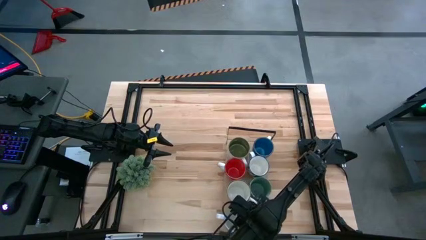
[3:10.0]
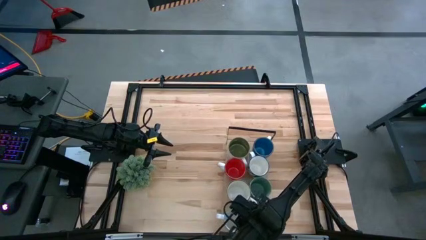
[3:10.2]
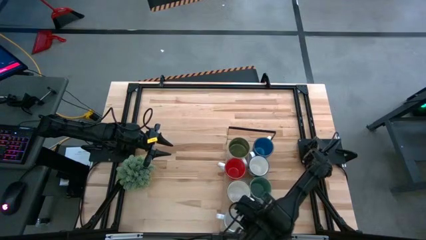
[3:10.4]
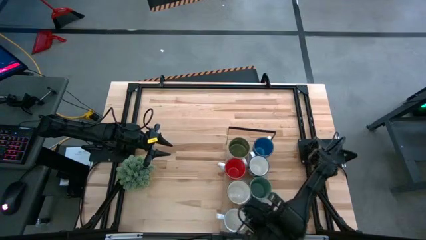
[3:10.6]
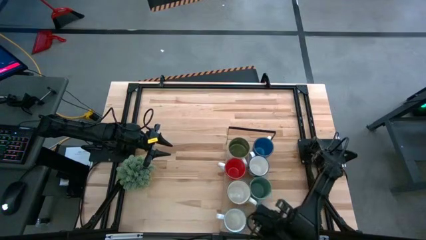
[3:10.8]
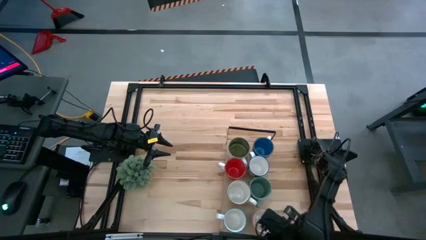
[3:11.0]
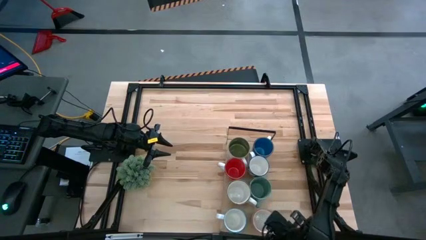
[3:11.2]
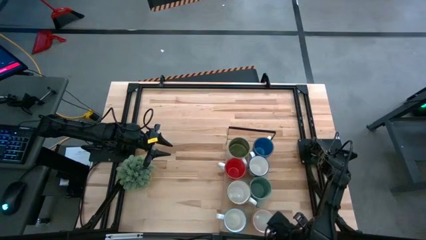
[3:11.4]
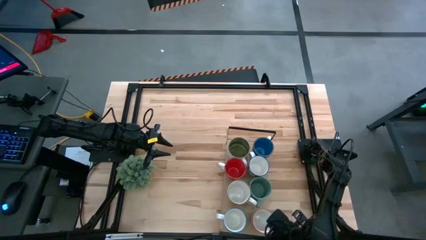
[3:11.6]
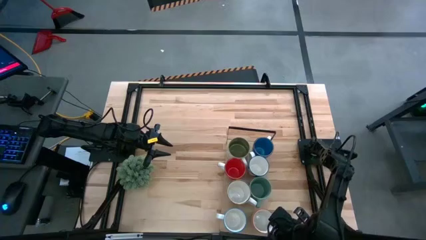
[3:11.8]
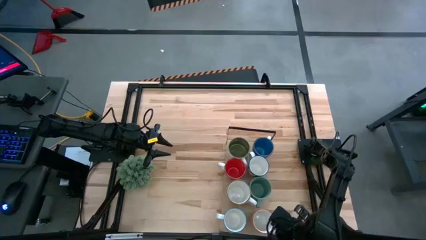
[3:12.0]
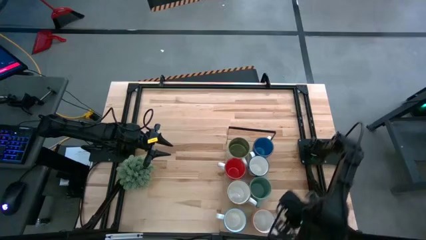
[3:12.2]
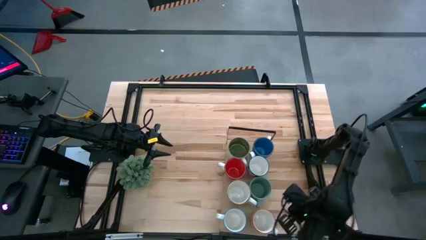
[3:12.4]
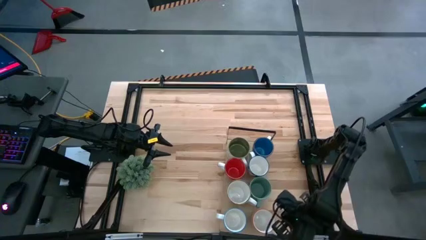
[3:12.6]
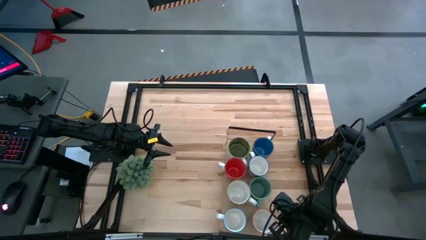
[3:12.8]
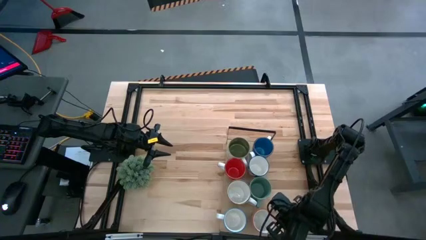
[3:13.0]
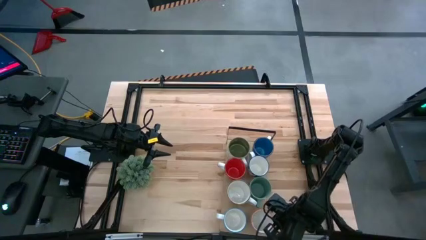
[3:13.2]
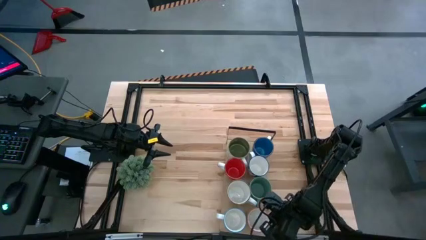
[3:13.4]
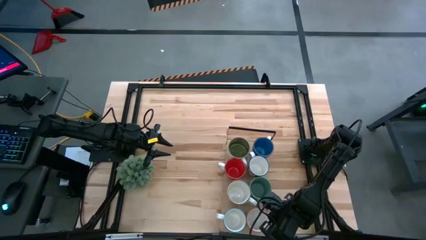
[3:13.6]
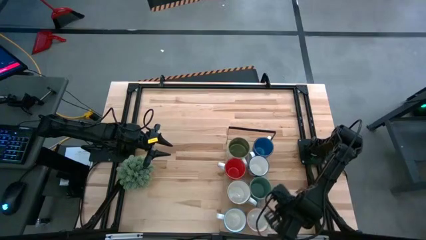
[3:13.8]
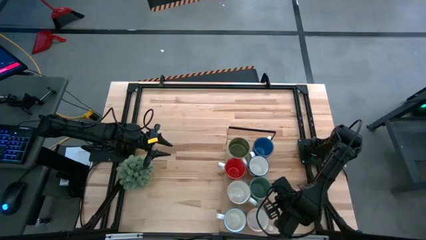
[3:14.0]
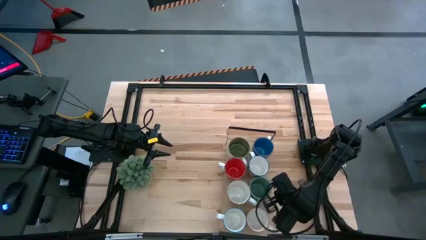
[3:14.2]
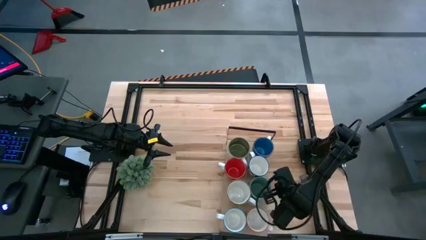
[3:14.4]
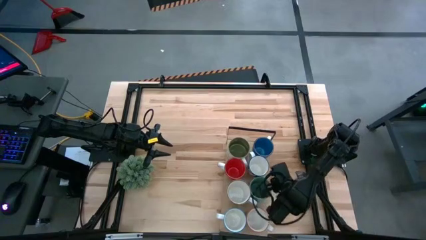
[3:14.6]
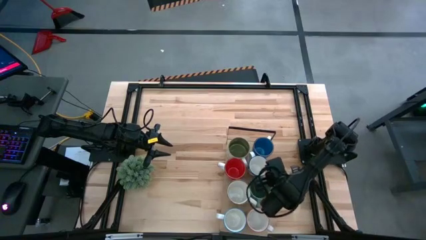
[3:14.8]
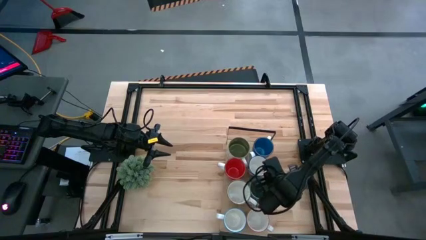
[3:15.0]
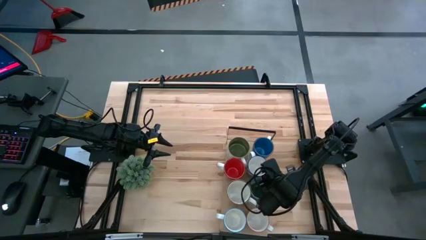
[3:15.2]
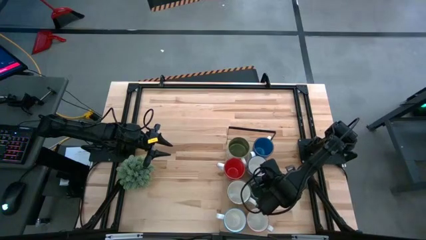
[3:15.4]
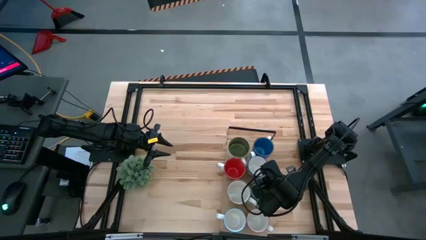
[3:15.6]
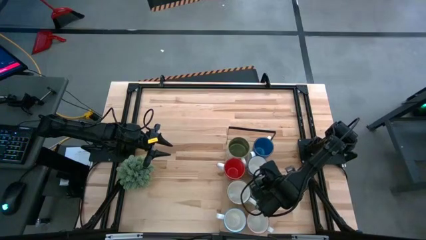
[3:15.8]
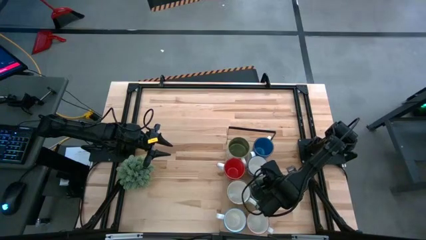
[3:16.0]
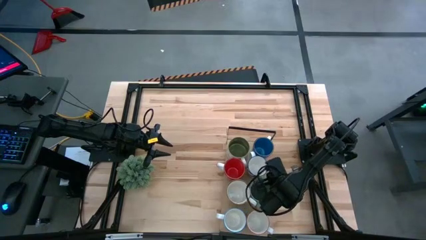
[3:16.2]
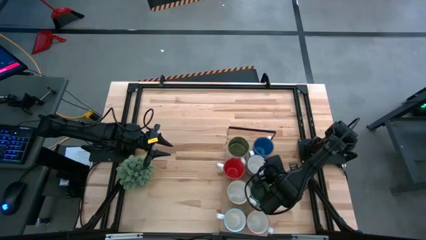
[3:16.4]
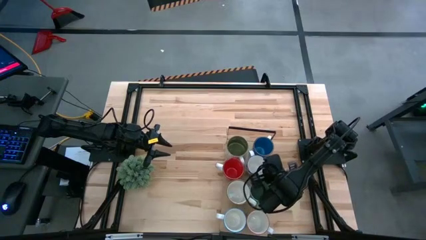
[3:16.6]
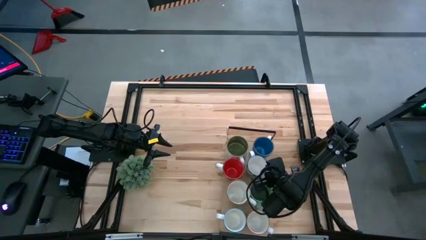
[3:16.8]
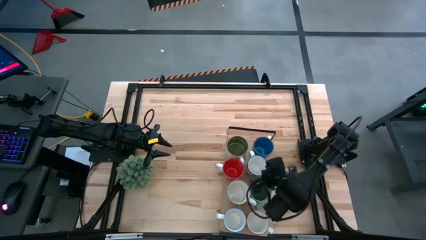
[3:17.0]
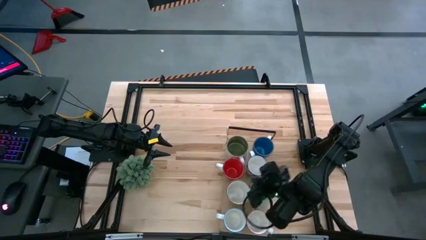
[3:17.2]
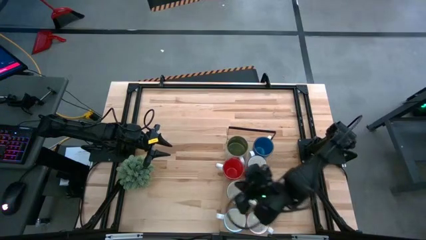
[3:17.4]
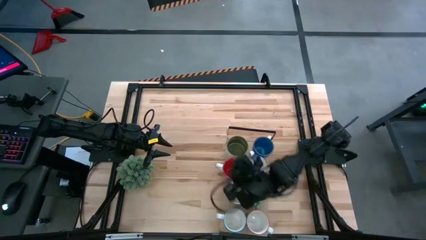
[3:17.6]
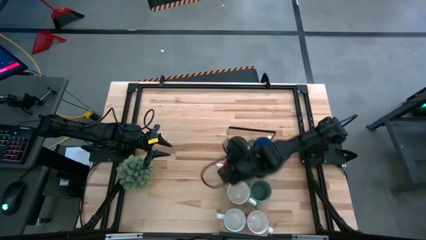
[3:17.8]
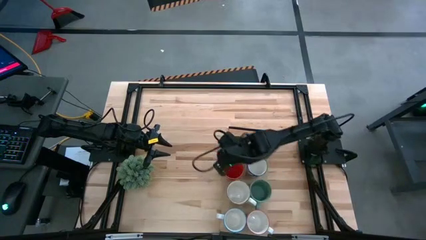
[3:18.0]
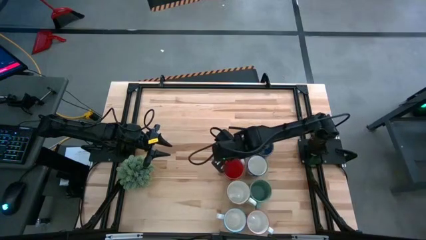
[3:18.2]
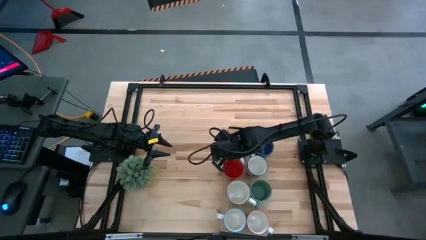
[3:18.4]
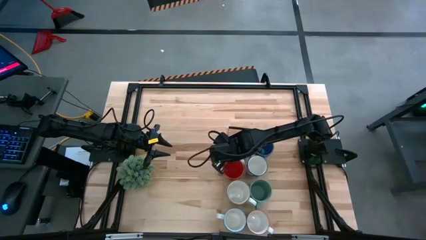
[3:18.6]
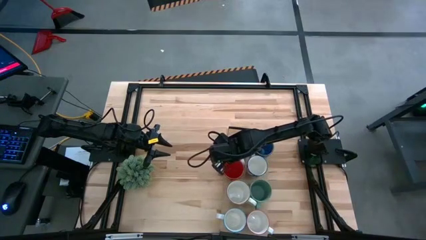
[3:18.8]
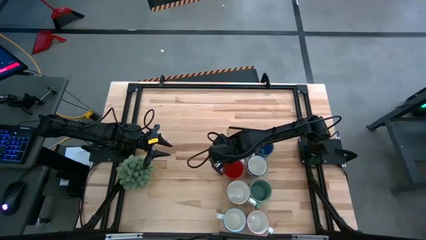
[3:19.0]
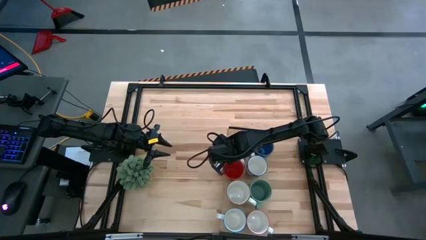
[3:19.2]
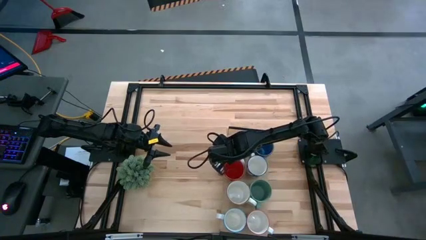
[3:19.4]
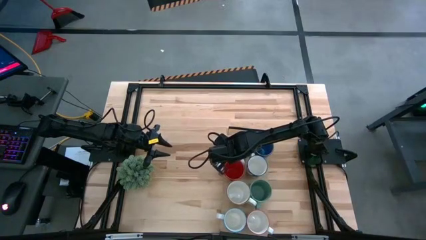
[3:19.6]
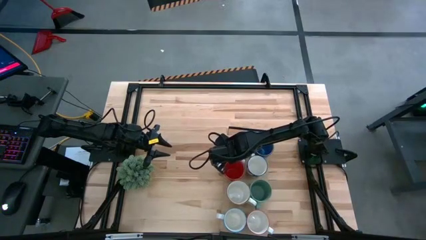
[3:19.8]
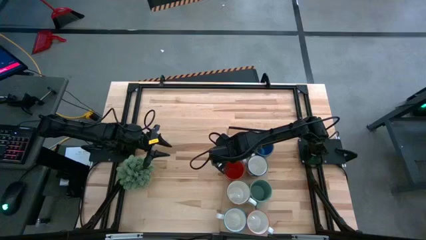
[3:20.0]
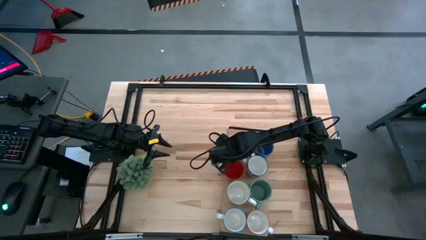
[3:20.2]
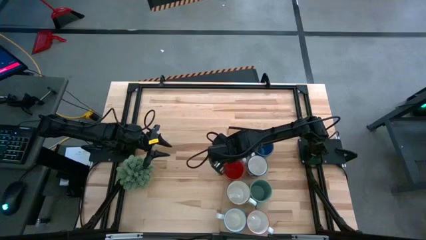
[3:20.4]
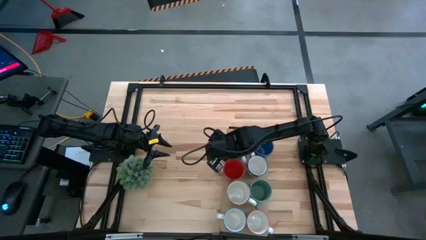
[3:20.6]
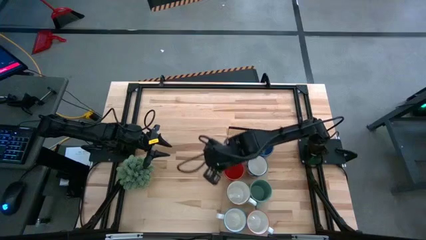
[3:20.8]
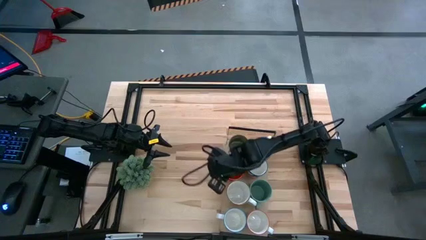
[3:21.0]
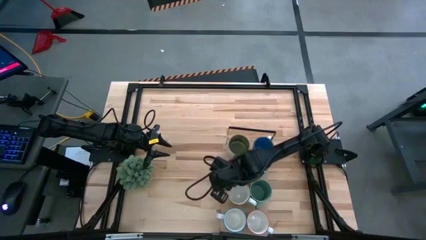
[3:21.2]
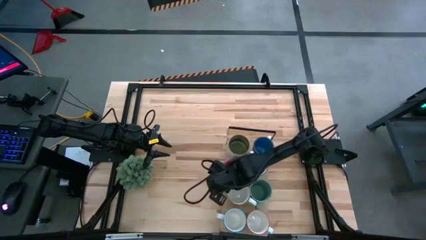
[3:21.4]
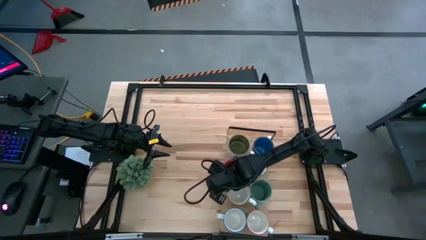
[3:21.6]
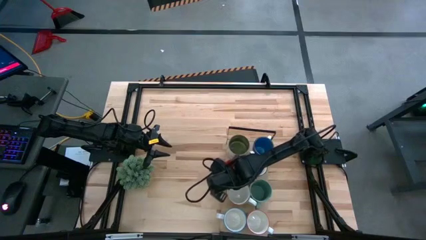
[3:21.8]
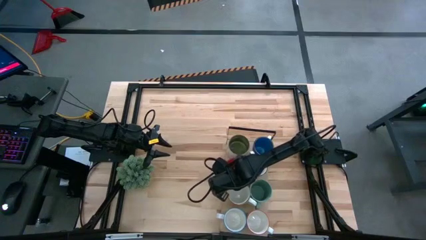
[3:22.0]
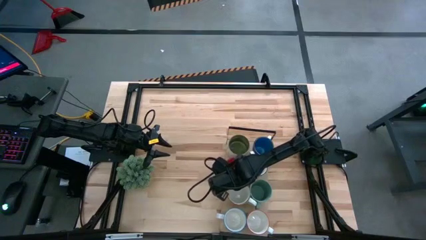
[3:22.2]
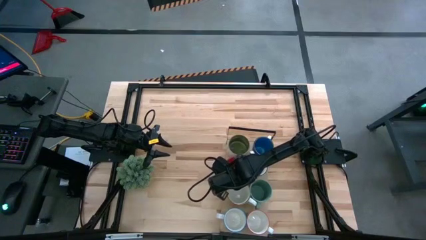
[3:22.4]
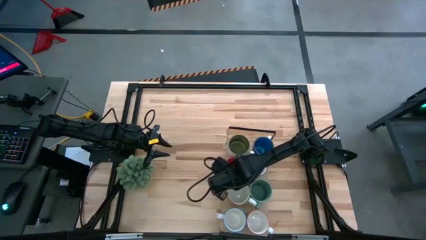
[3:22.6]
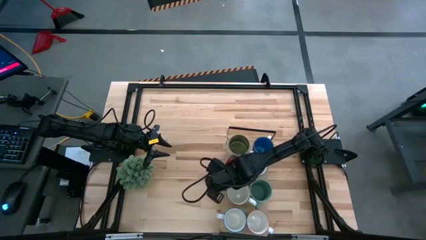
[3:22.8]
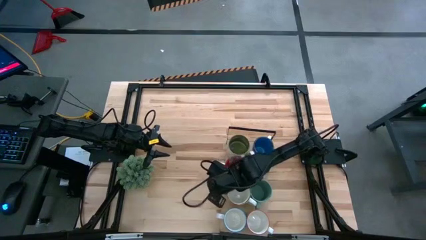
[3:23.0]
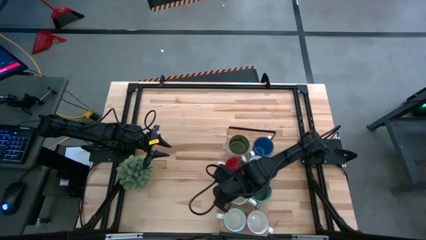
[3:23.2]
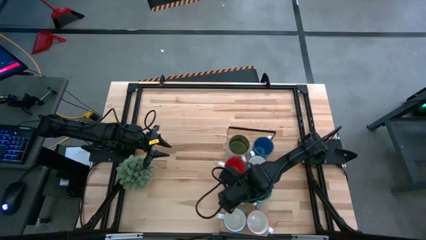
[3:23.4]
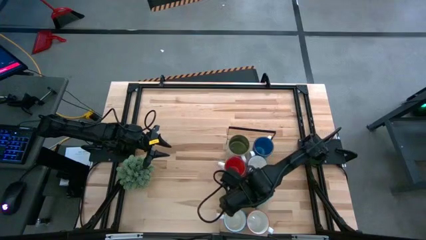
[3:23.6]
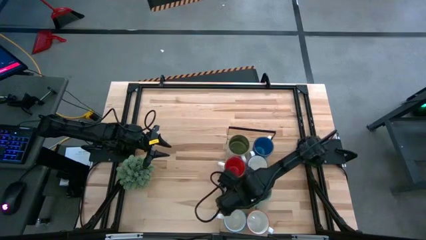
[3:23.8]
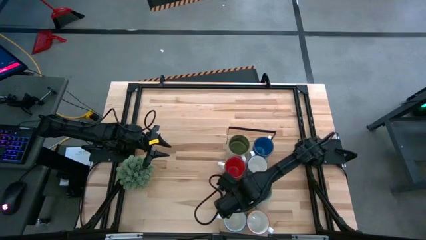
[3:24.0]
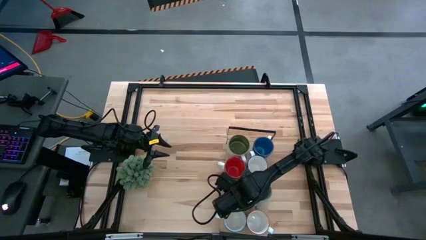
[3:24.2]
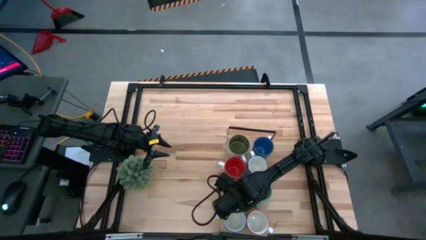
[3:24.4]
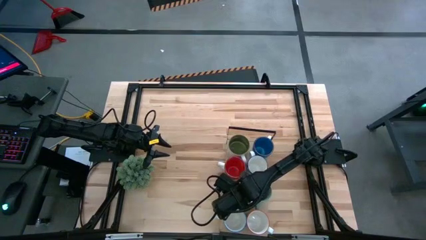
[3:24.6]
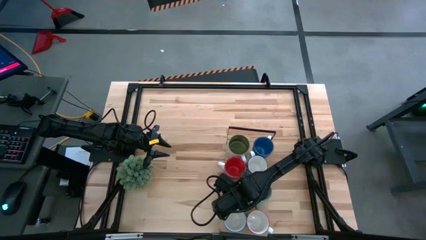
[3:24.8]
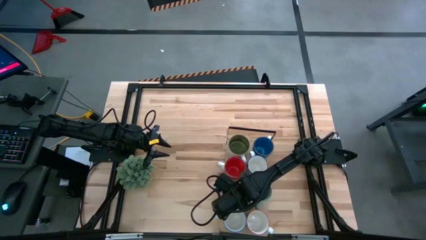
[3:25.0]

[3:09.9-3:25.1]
Task: Place coffee mugs
Adjust the mugs on the shelf
